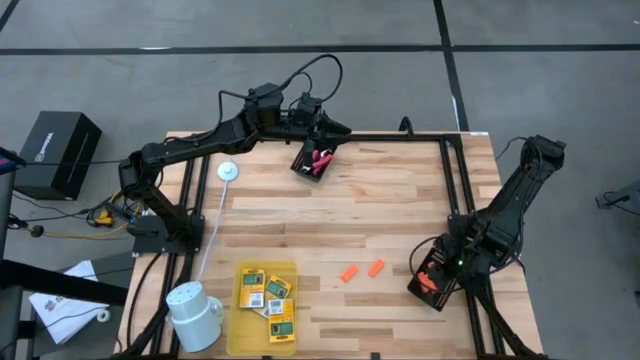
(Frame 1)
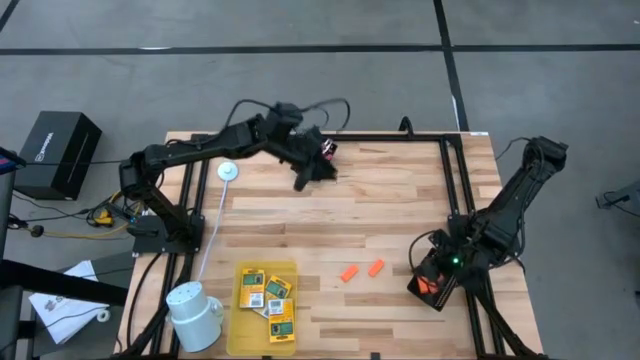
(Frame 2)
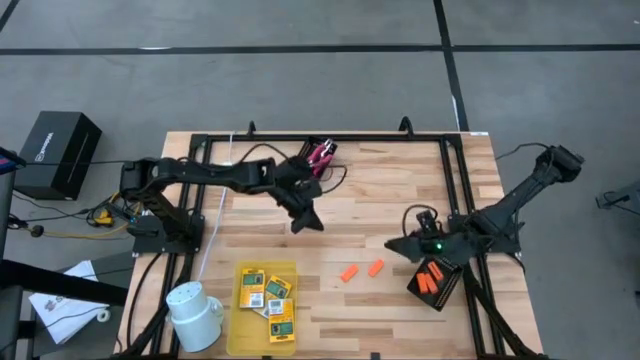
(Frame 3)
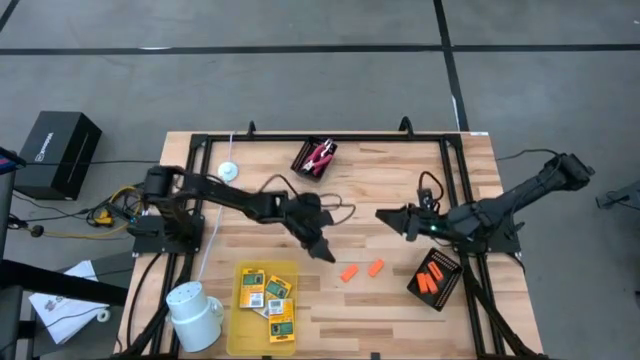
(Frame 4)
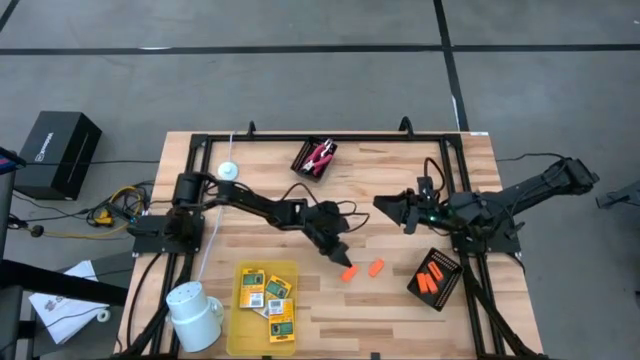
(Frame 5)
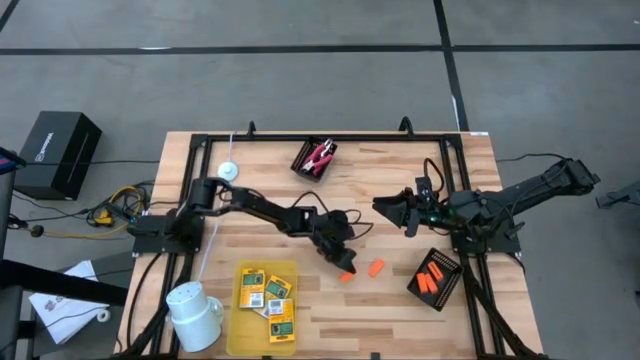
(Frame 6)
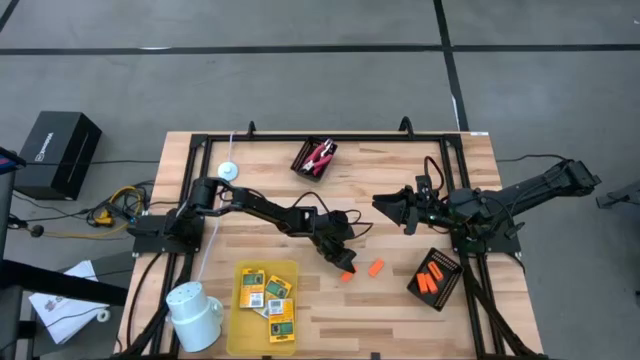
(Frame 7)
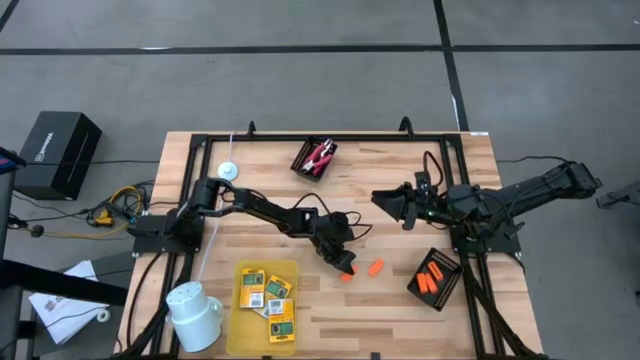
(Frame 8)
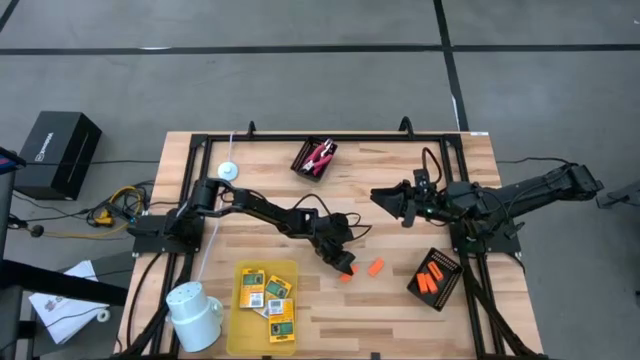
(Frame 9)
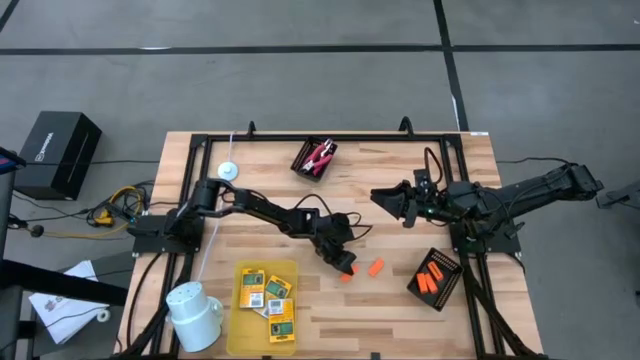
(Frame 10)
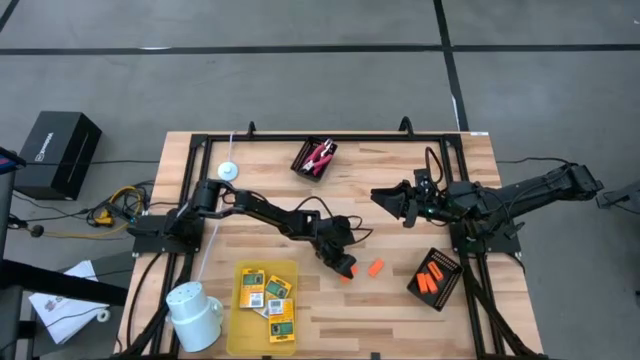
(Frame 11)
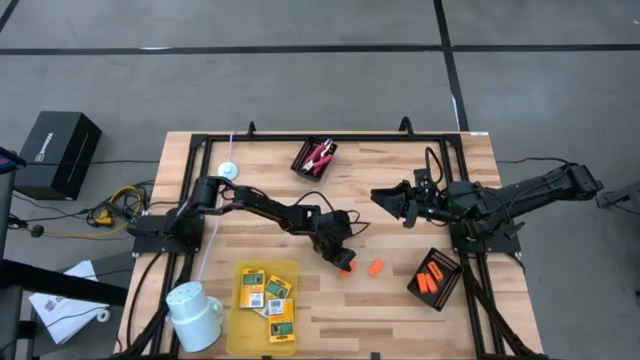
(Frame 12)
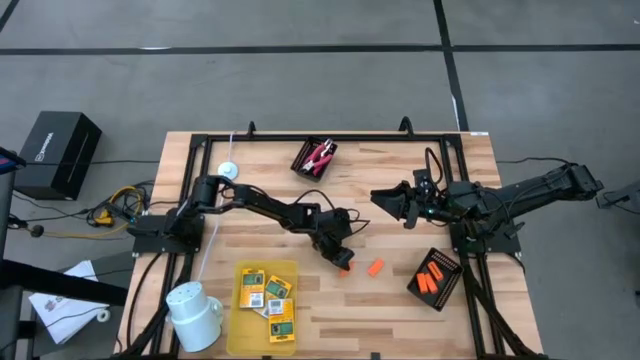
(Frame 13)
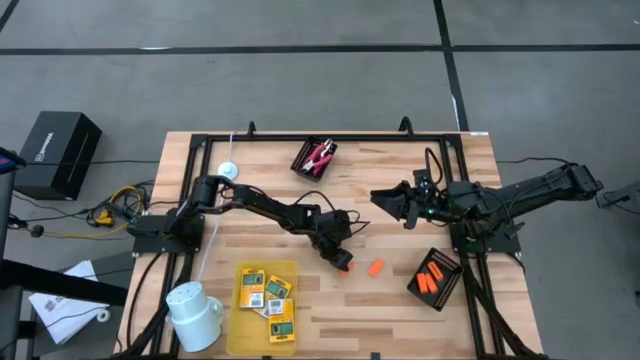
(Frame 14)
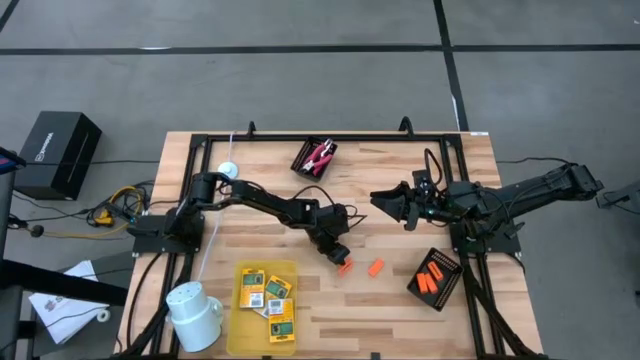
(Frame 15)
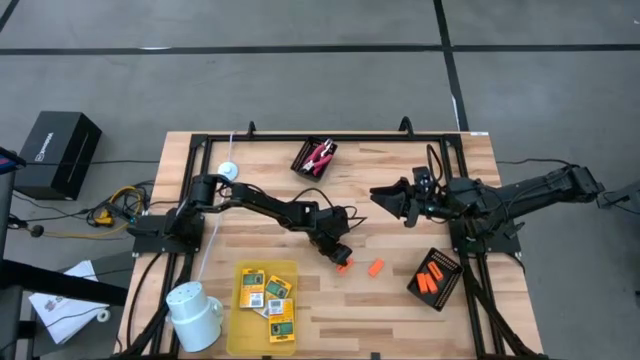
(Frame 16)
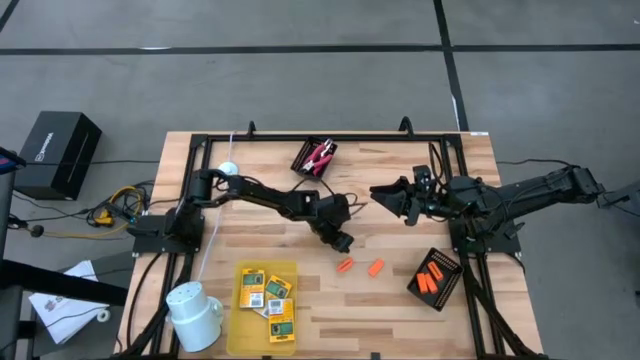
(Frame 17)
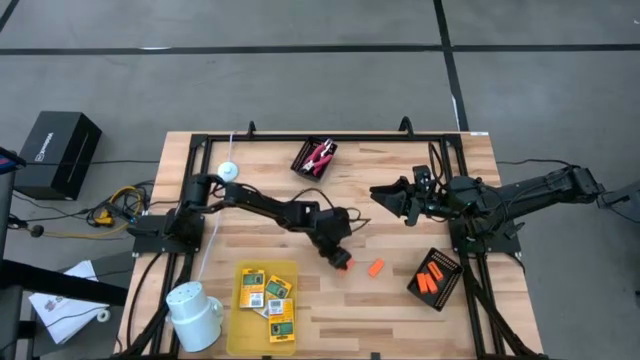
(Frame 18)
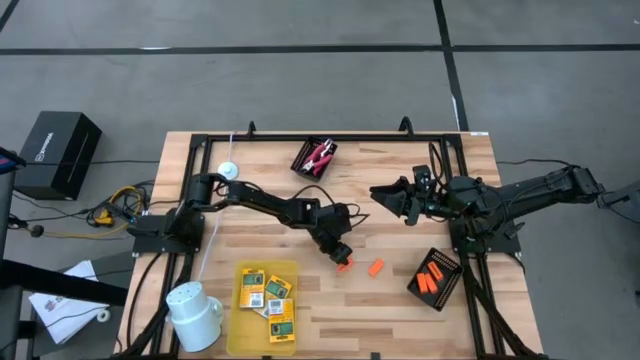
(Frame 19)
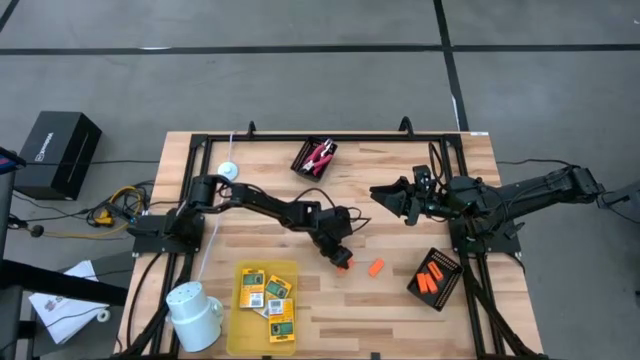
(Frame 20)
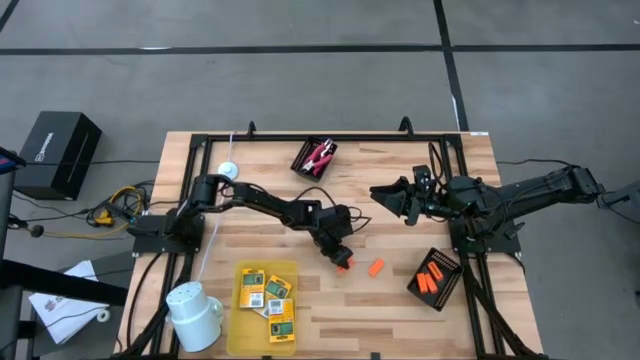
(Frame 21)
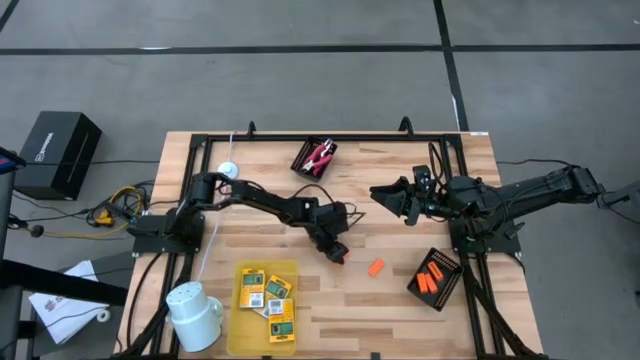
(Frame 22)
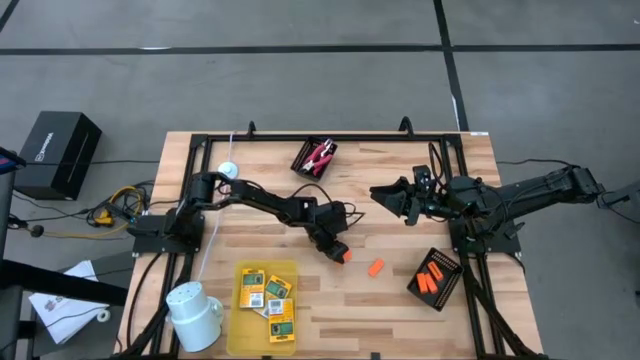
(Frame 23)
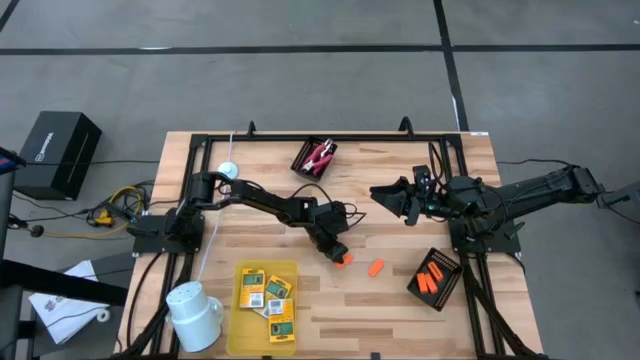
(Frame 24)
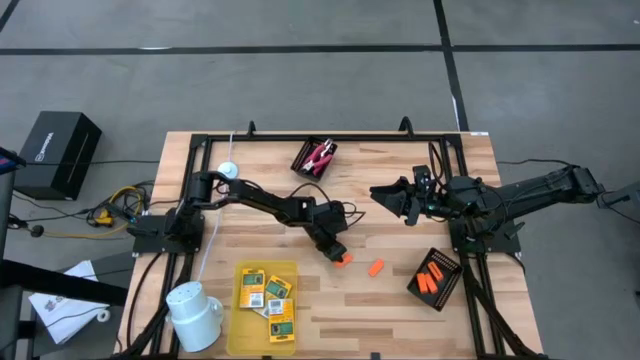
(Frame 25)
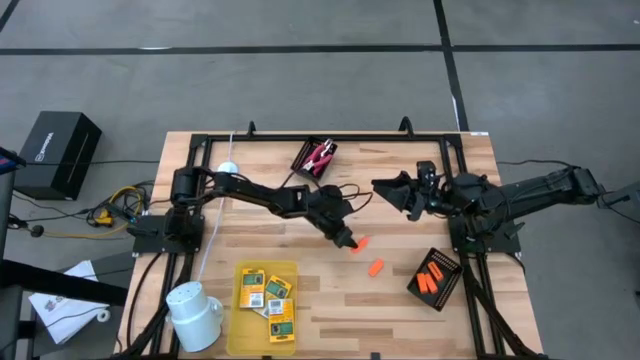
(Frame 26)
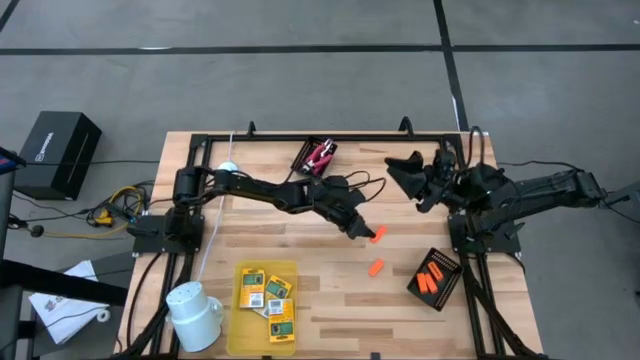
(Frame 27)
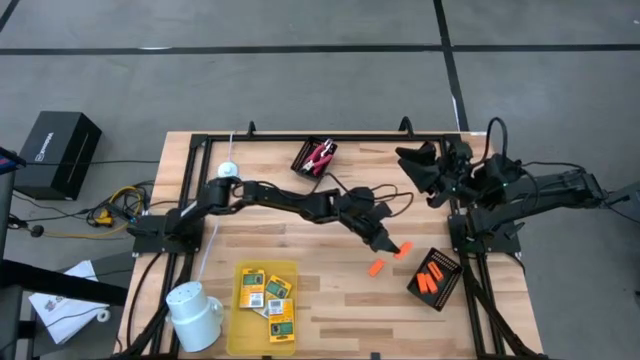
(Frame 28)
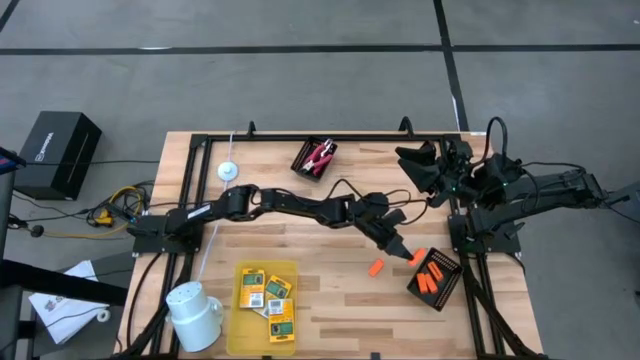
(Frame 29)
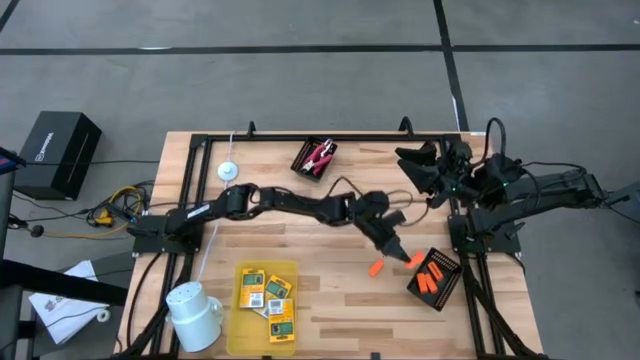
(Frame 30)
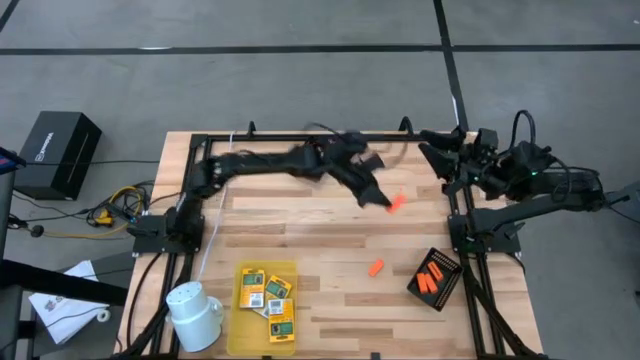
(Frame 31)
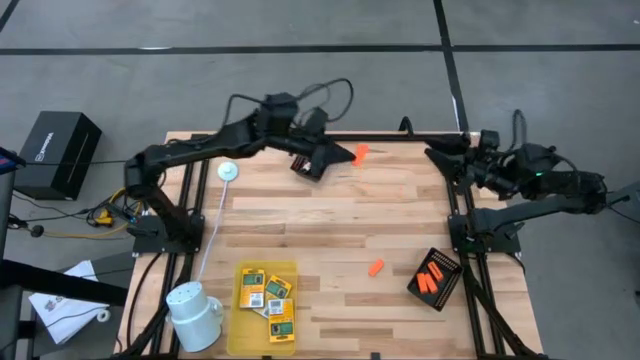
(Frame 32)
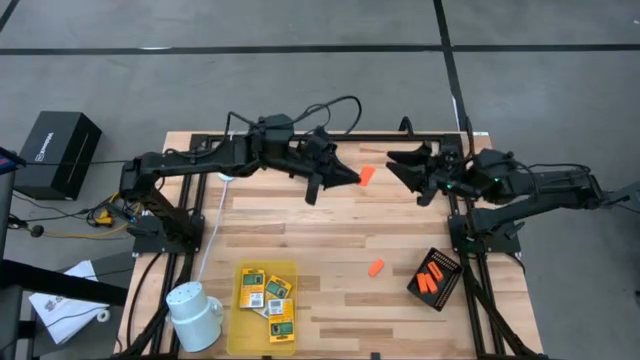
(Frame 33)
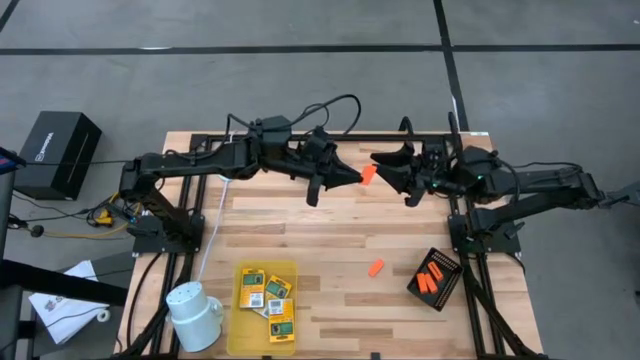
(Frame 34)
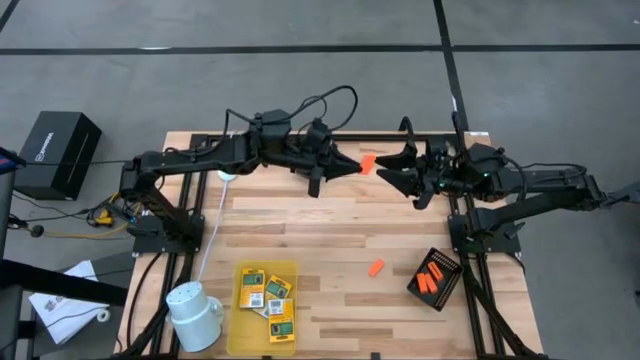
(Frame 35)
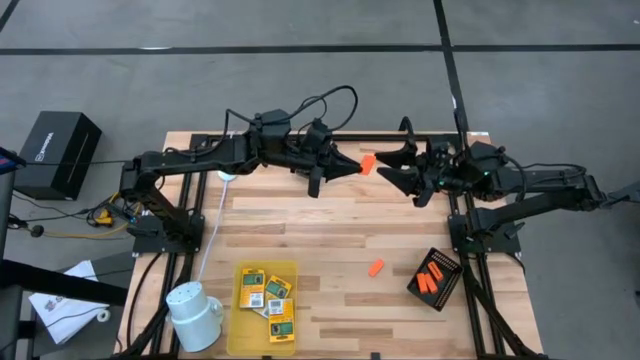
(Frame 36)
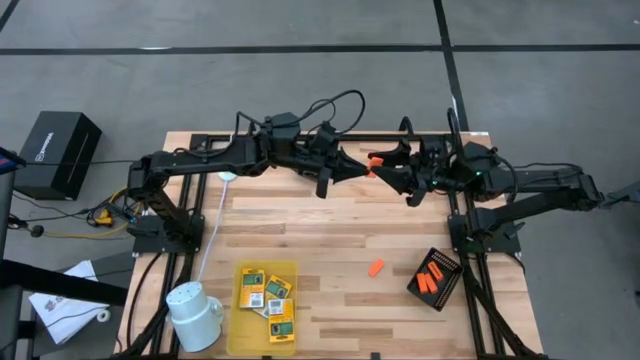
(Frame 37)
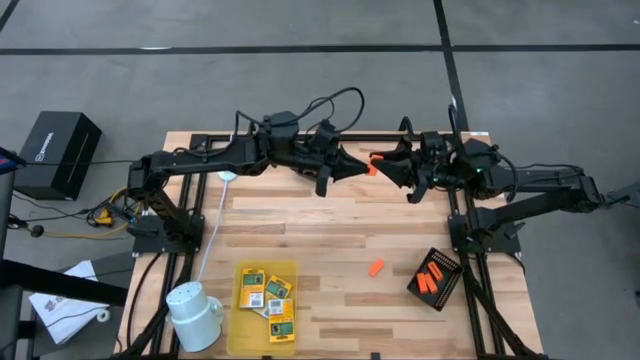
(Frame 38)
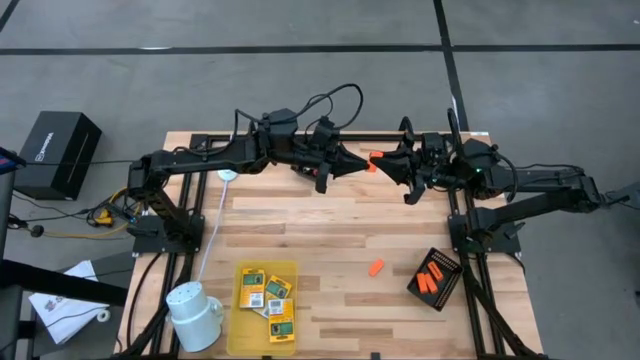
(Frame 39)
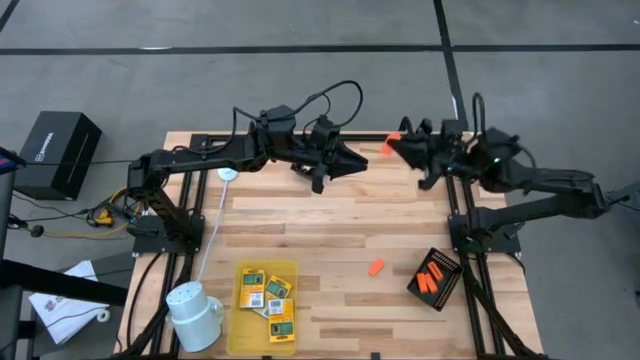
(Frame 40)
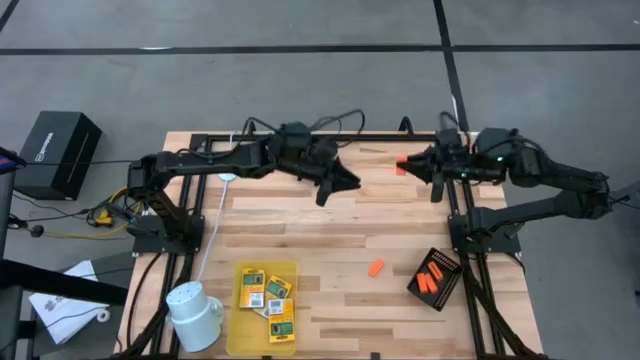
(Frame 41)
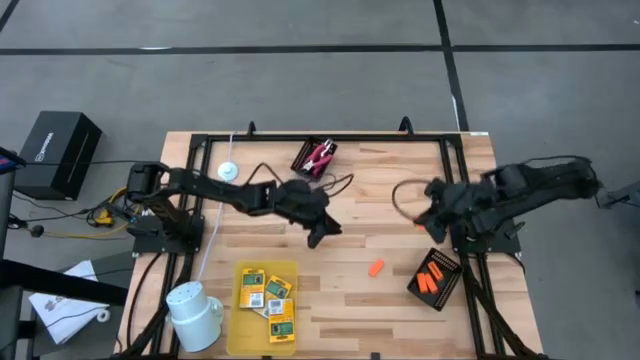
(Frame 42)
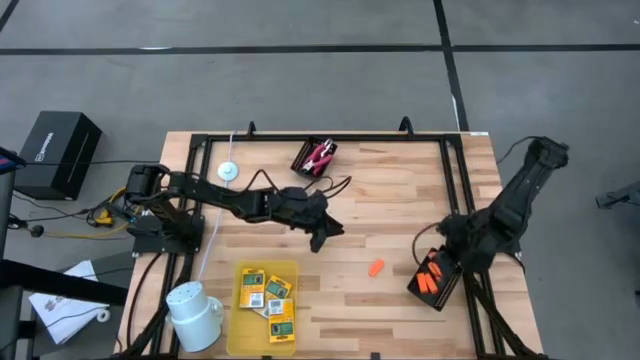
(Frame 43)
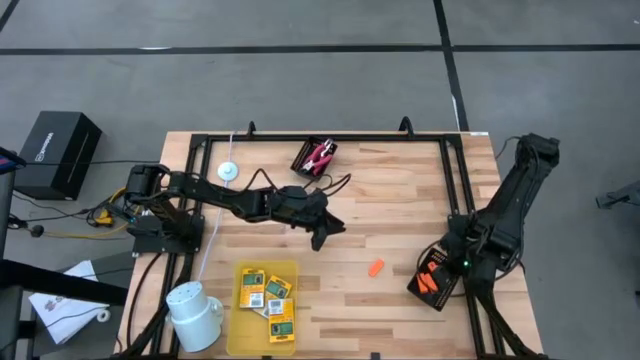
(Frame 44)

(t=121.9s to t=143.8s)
Task: Pick & Place School Supplies
Put the orange eraser into the bottom black bin
